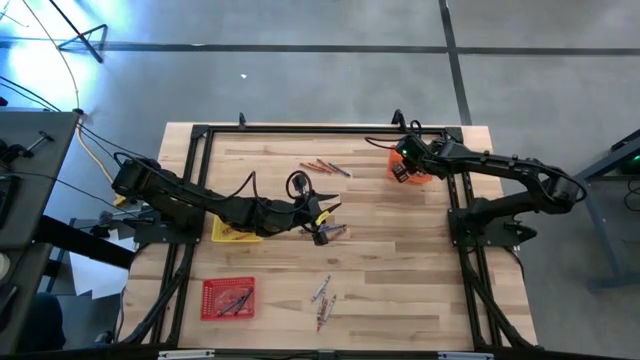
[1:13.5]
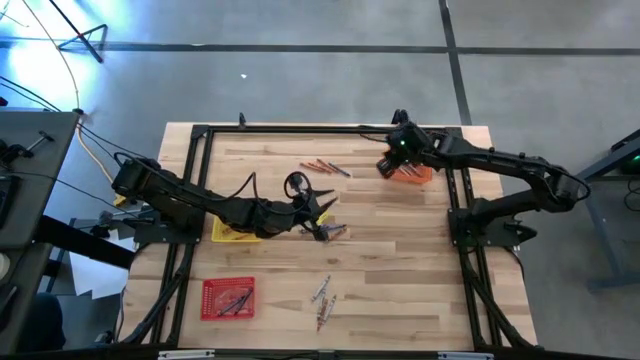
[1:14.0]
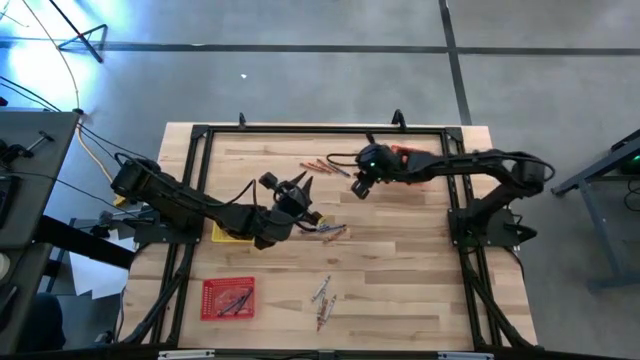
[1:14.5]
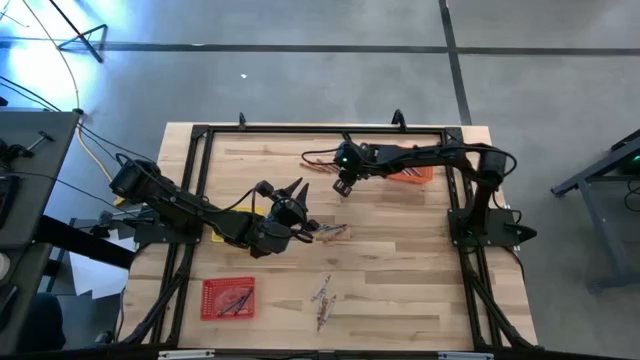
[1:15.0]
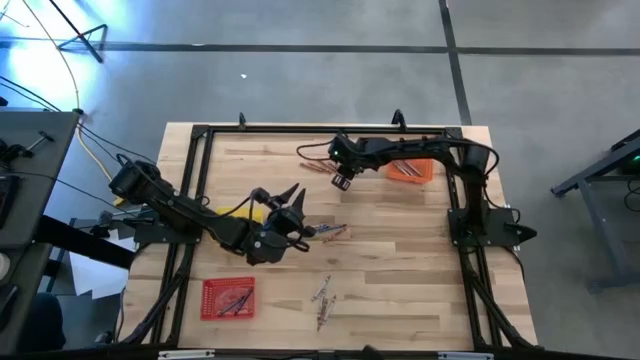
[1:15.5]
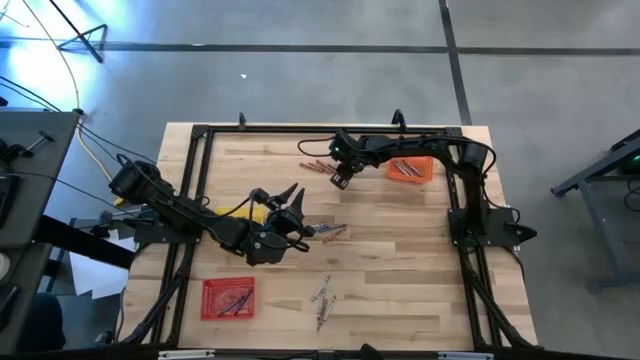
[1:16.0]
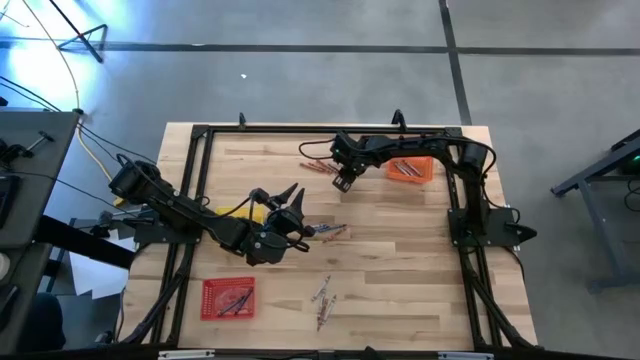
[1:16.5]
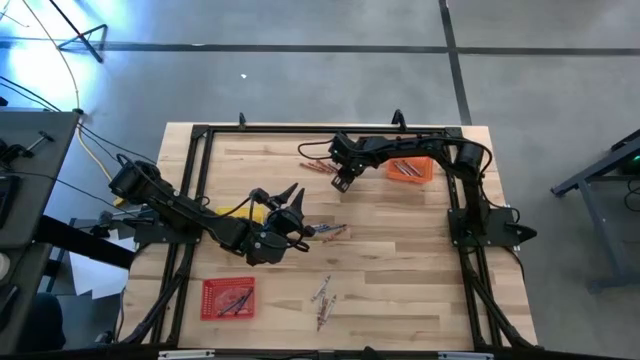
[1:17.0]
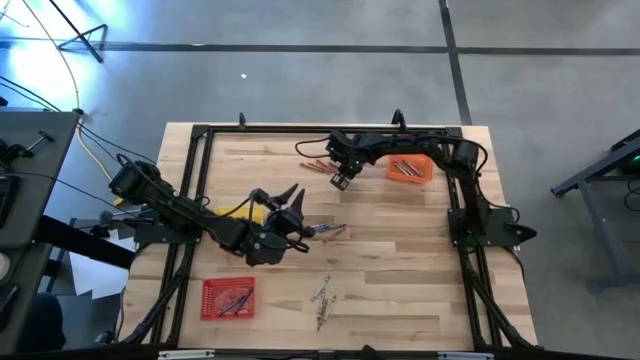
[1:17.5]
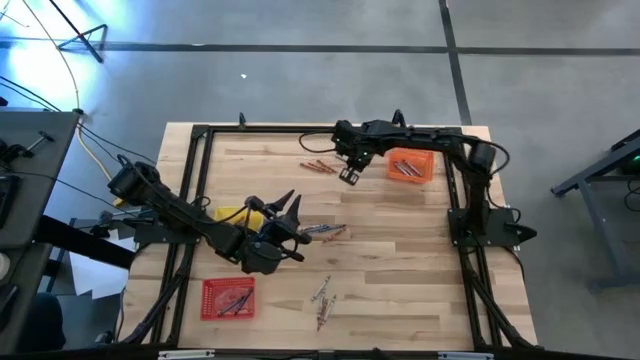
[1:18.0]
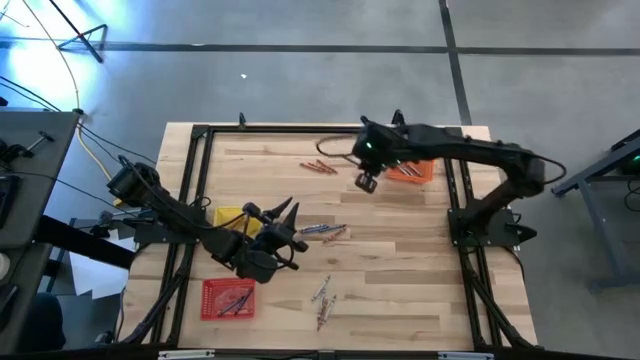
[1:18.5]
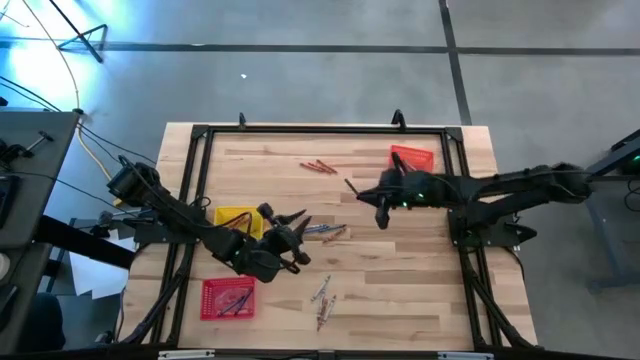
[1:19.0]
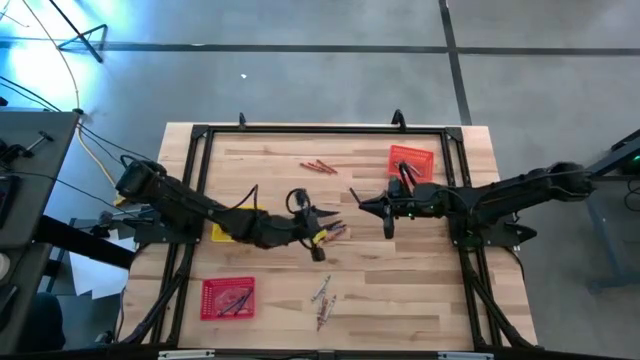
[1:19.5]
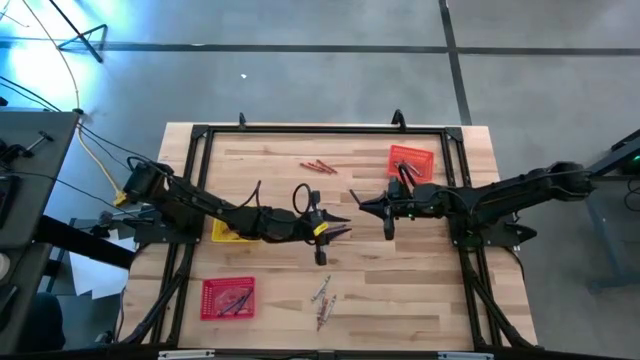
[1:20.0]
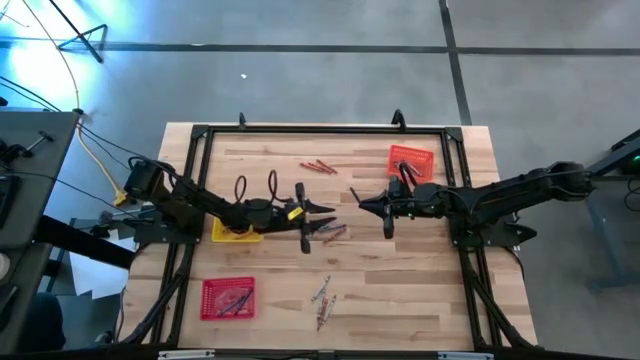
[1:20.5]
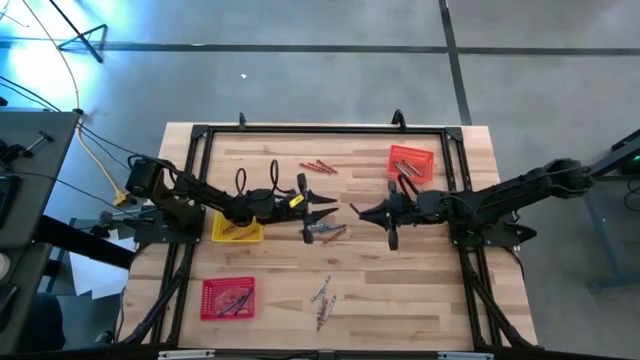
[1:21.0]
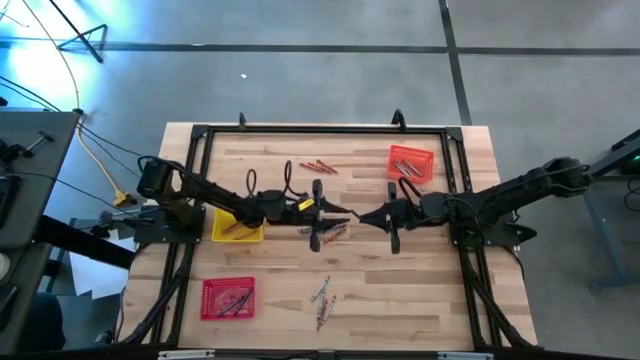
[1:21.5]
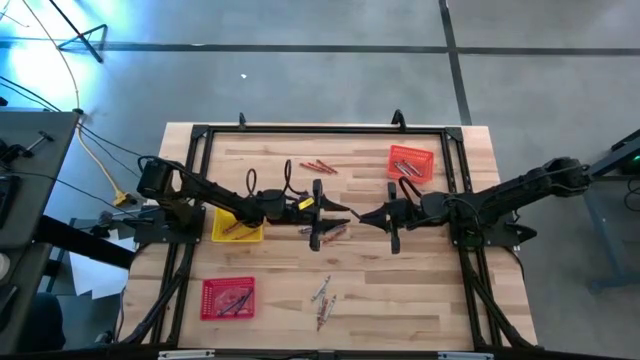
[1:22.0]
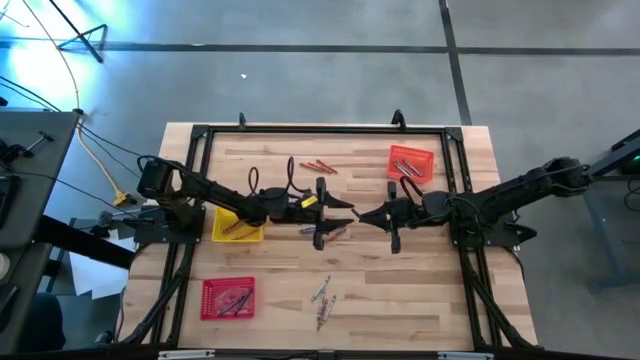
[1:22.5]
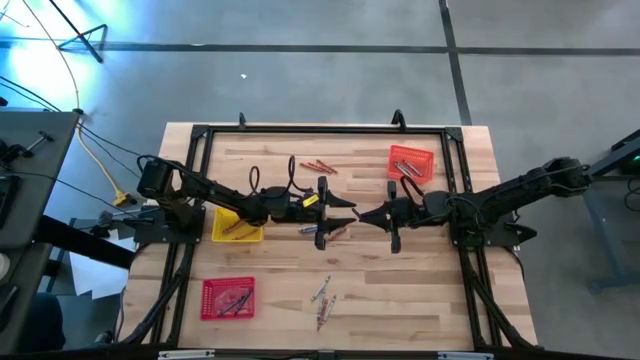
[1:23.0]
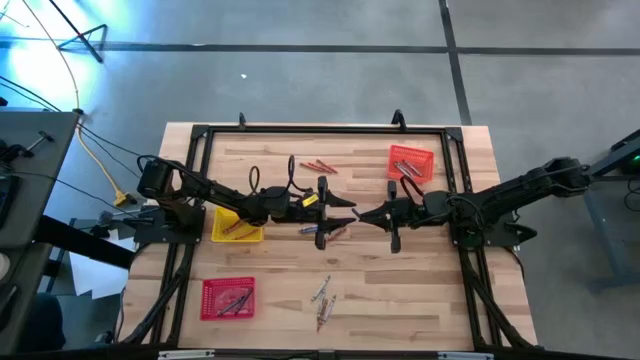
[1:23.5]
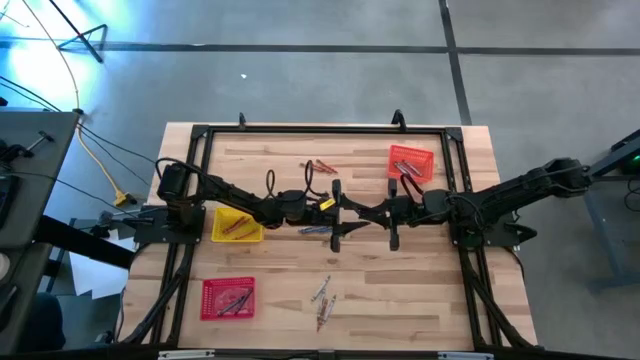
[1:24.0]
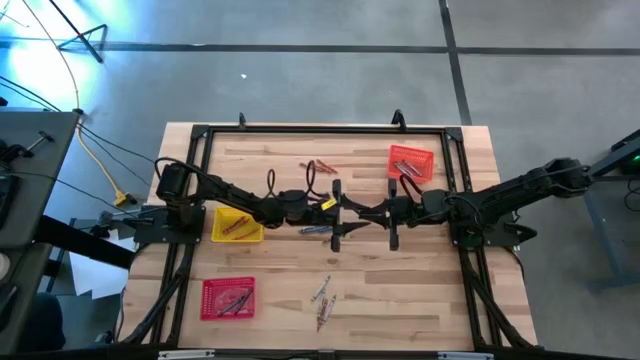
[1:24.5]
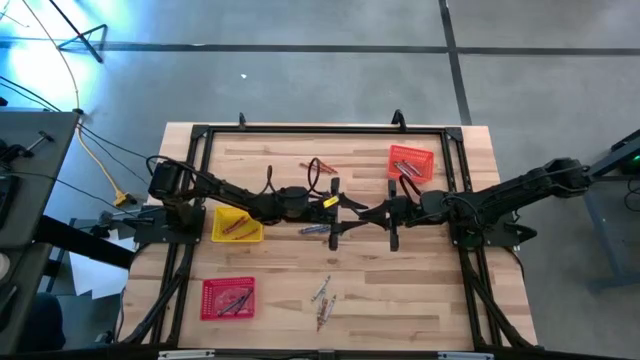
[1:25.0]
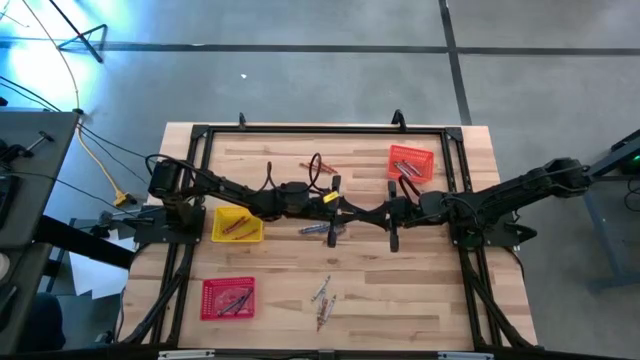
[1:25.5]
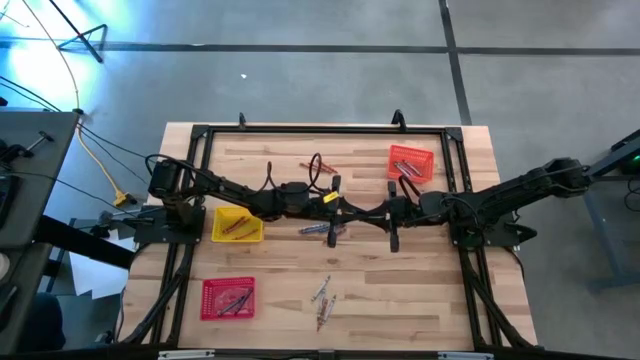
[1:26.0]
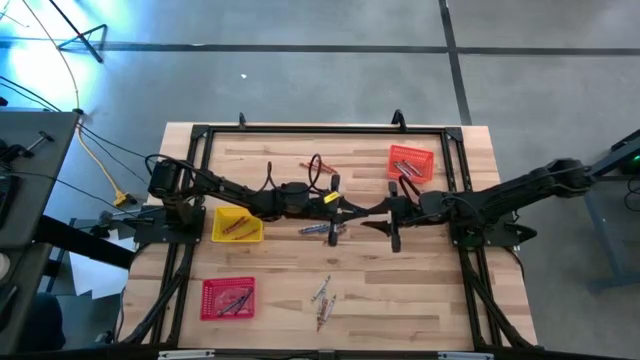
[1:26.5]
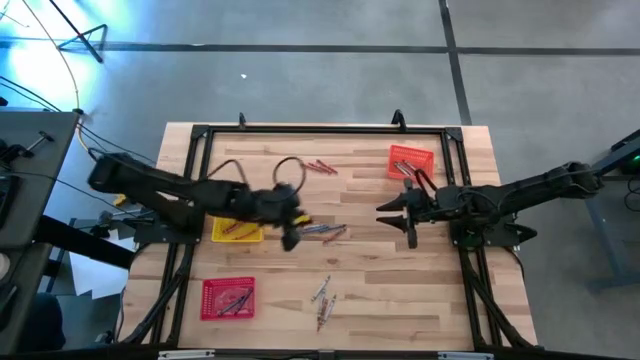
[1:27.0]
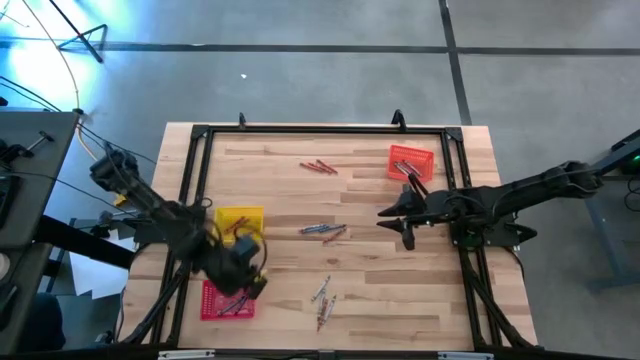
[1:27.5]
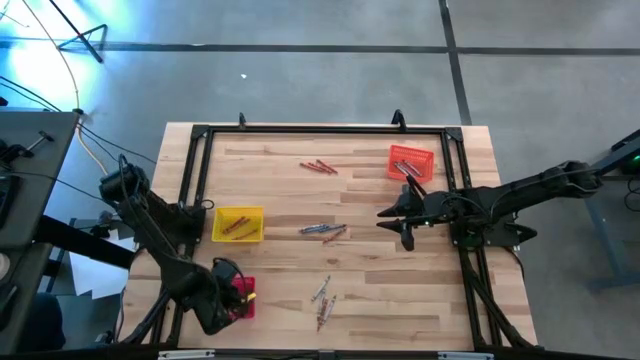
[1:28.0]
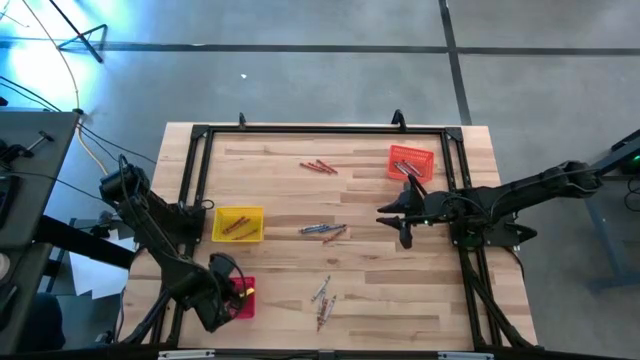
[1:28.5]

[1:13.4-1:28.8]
Task: Sort crayons
Put the blue crayon into the red bin

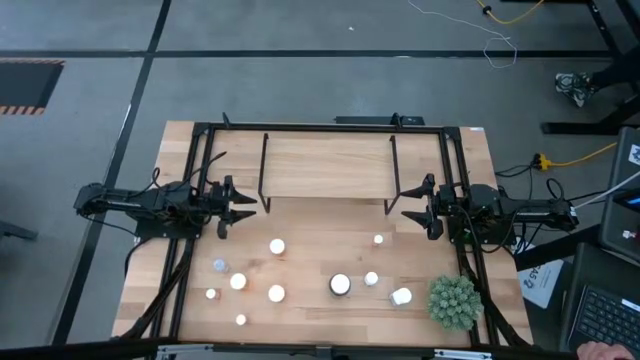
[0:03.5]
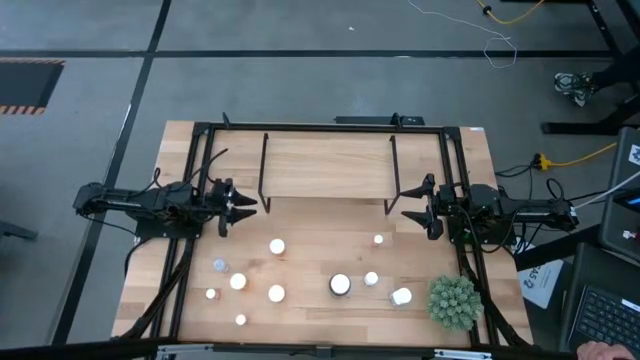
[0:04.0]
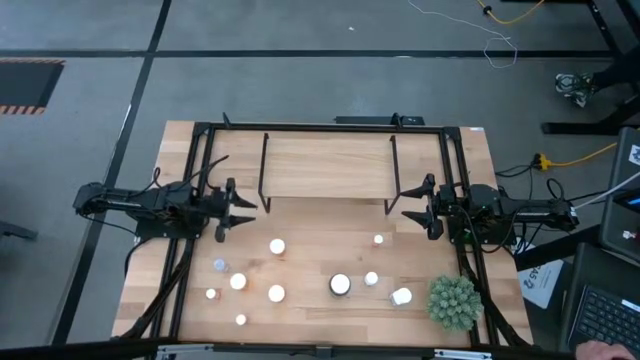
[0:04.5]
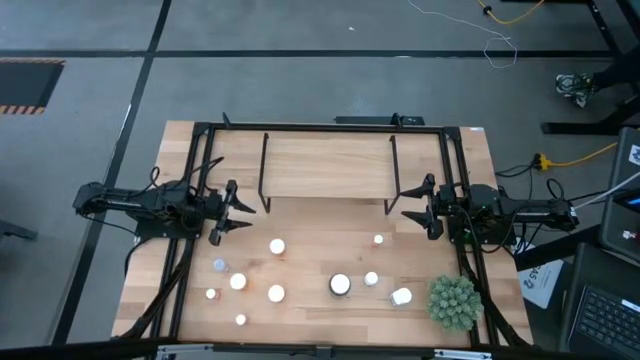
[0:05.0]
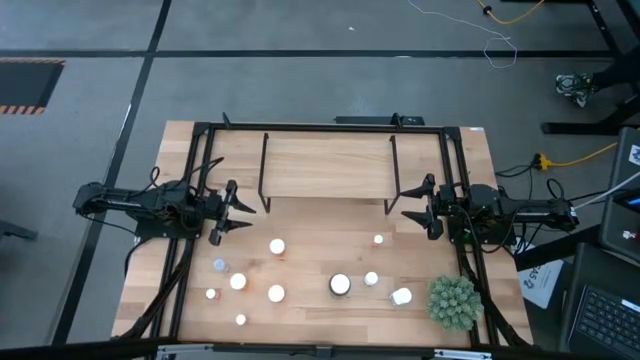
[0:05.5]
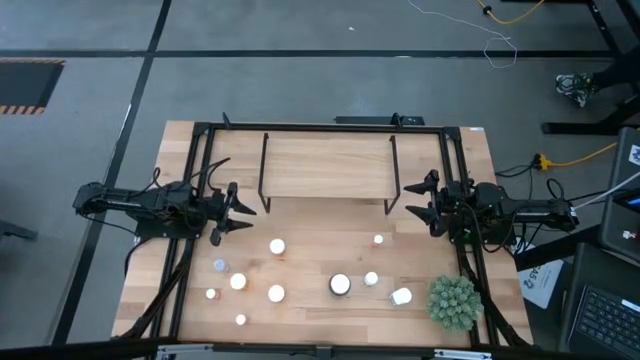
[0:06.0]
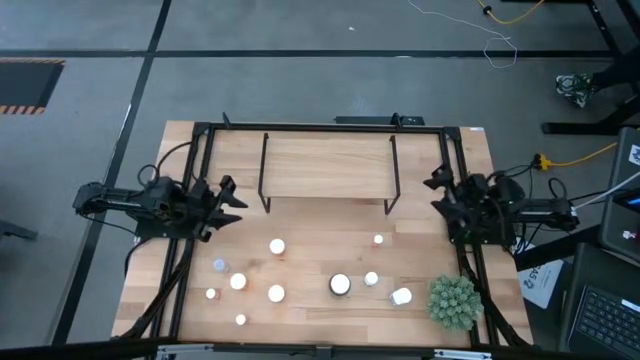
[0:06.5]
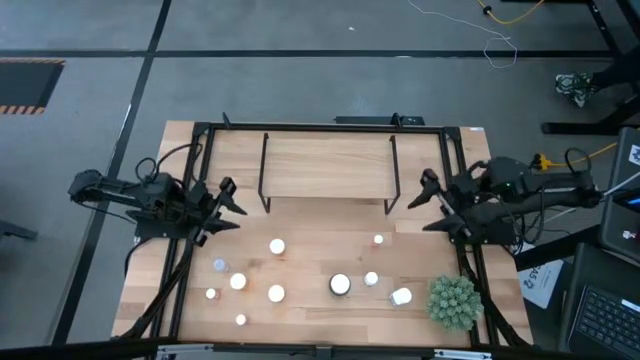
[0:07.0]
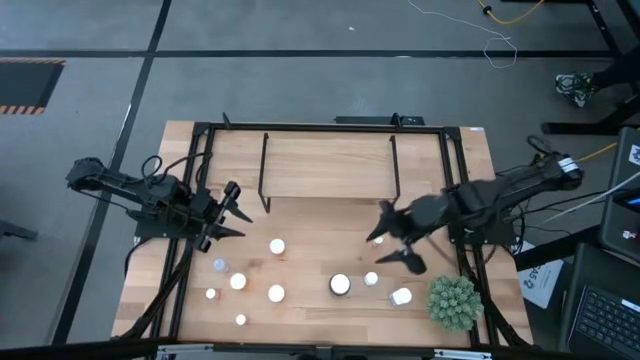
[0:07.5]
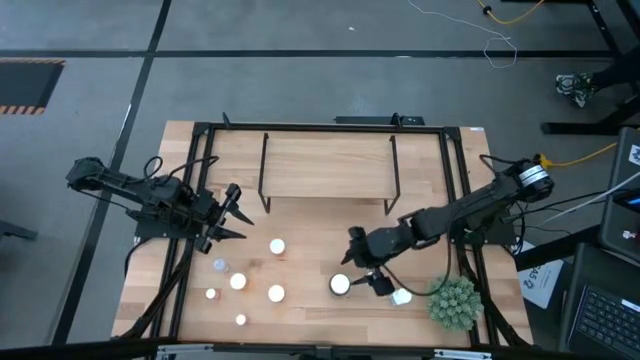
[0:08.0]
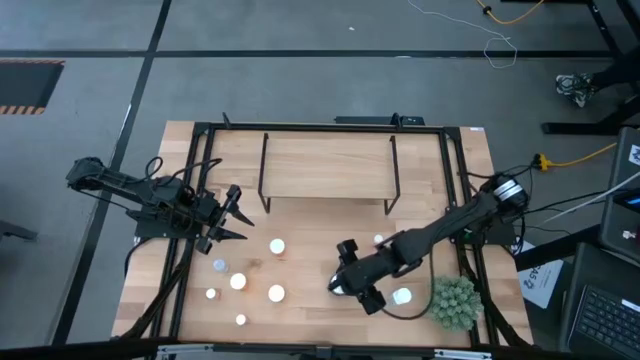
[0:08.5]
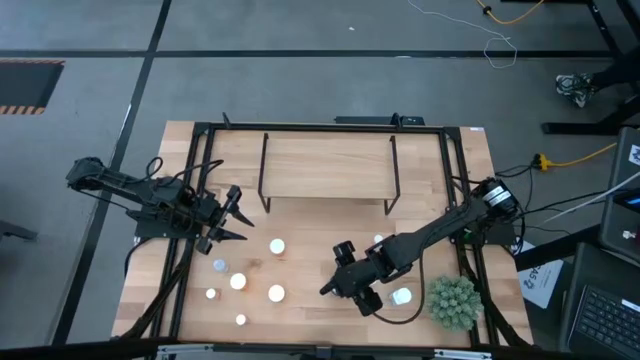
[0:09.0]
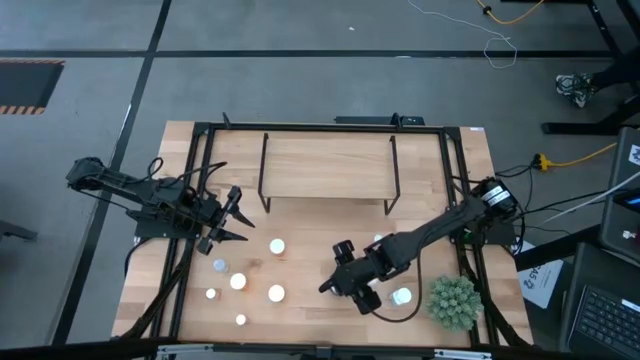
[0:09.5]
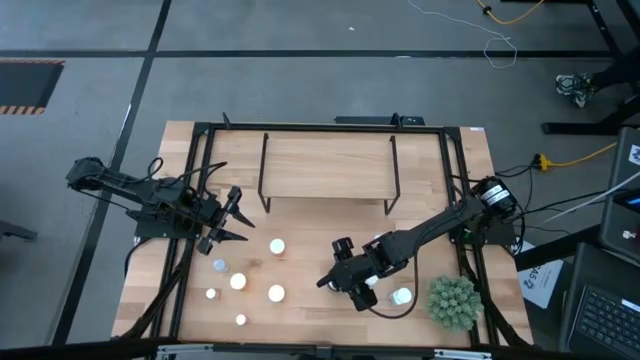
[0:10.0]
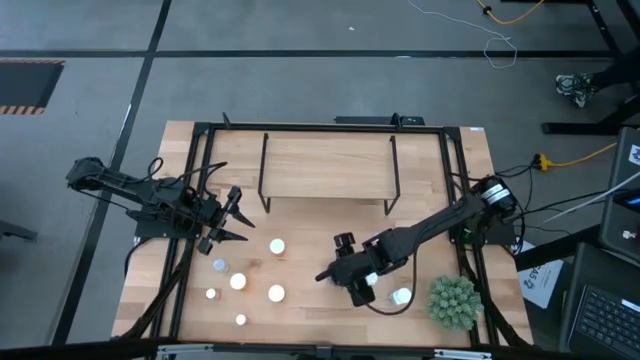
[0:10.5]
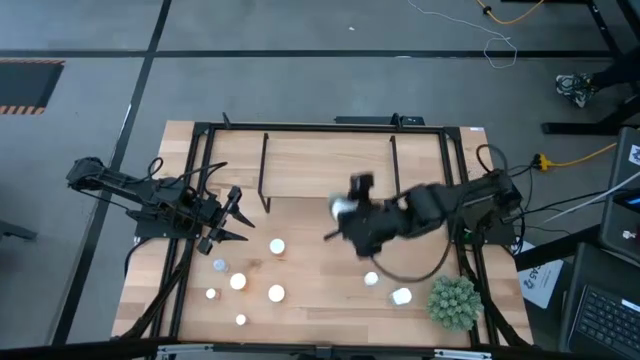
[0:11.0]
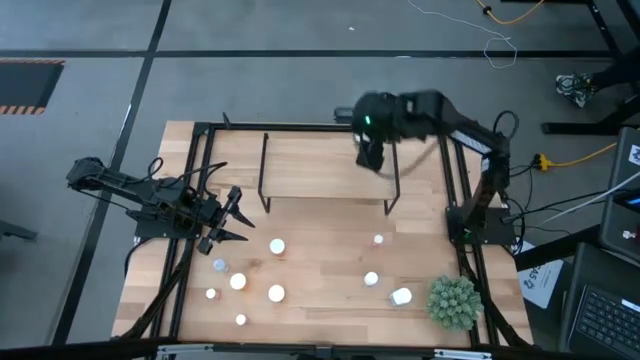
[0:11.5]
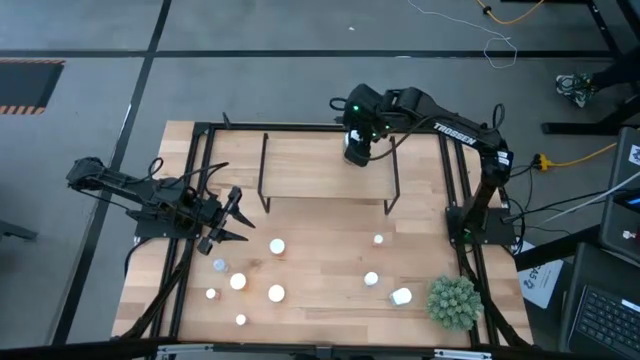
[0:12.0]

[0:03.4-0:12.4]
Task: Pick and place medicine bottles onto shelf by color
Put the green pill bottle on the shelf
